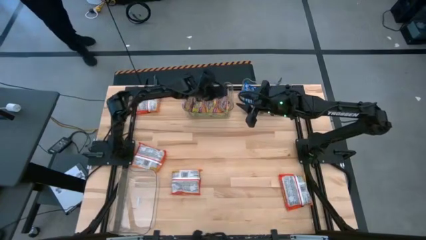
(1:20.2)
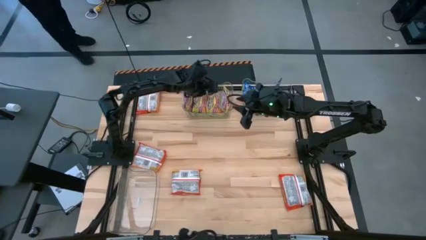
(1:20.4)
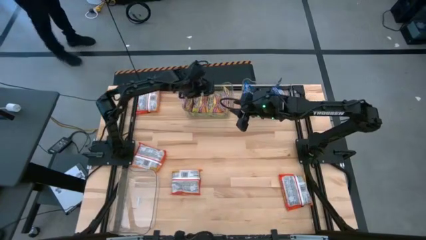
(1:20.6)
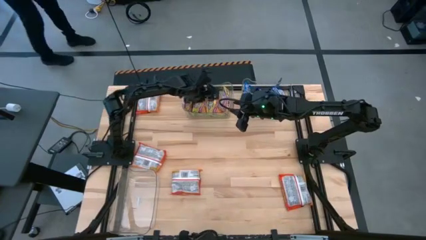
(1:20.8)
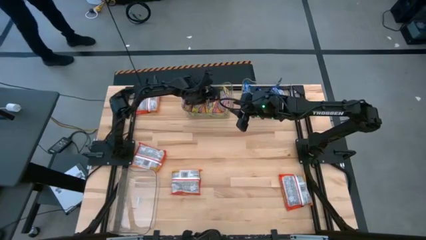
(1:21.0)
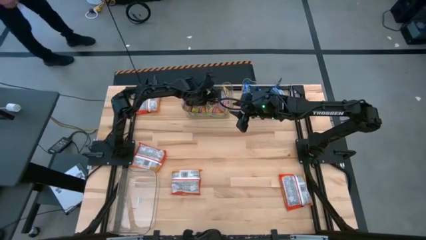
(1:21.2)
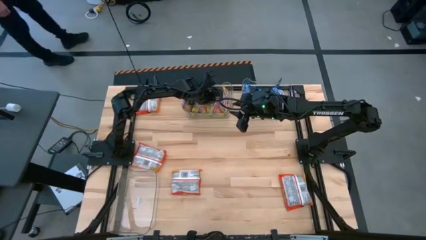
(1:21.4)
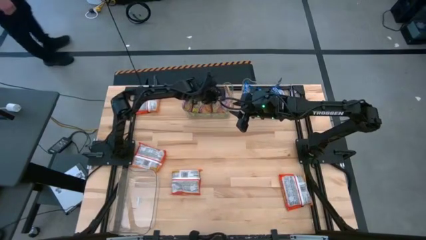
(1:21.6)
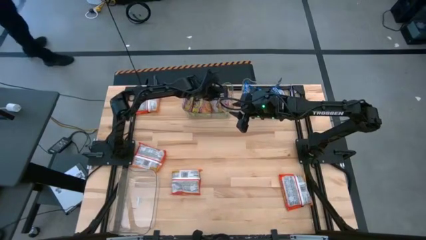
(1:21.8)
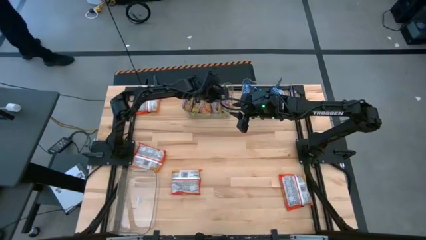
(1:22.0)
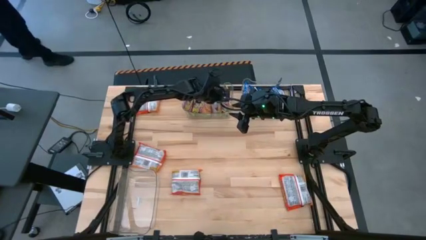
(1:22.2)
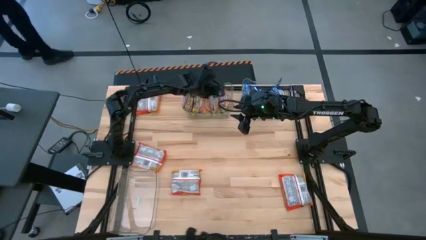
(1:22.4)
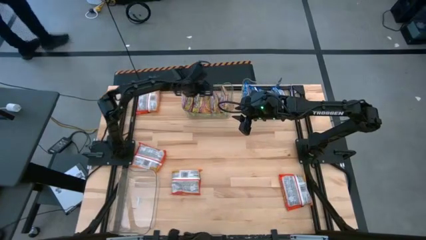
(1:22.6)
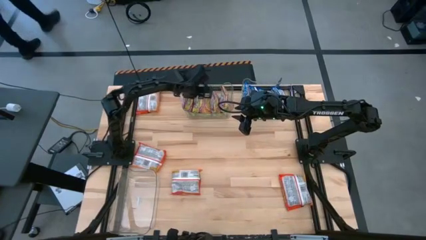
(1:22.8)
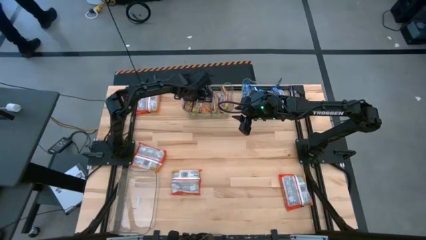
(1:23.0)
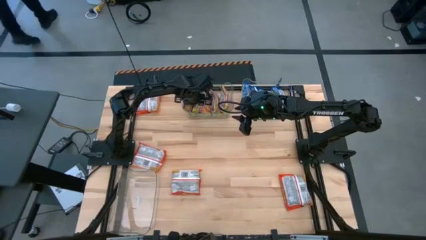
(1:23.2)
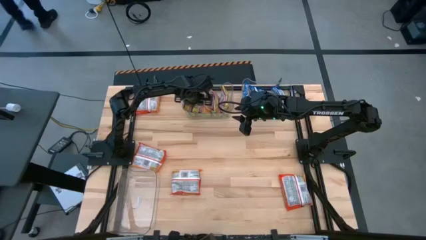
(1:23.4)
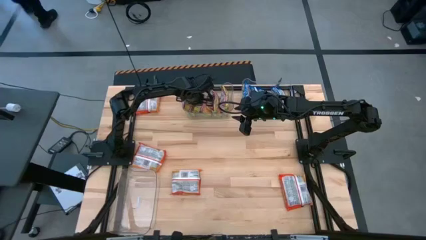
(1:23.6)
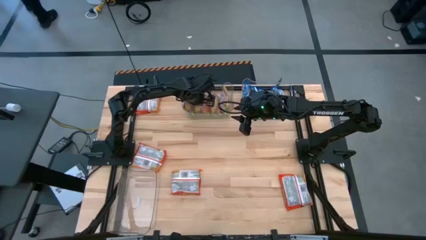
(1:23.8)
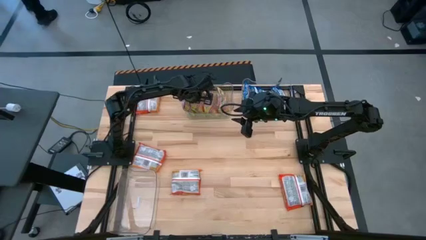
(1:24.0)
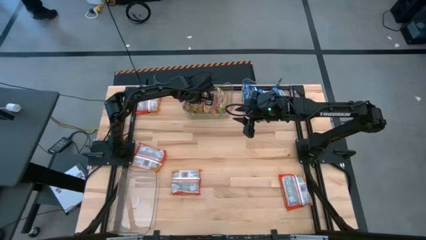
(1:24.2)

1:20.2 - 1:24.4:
Task: Sort Maruchan noodles
Adjust the green noodle packs in the top left transparent bin

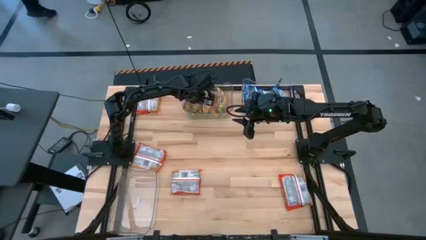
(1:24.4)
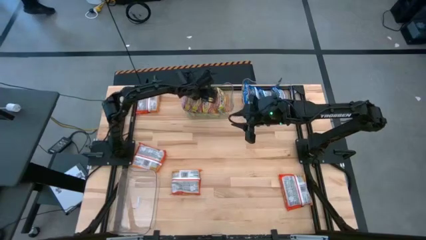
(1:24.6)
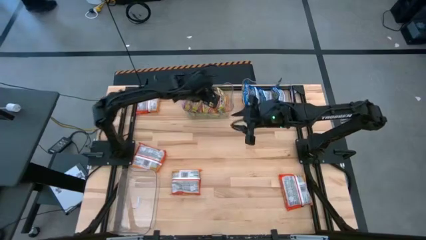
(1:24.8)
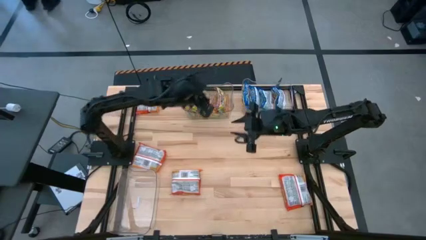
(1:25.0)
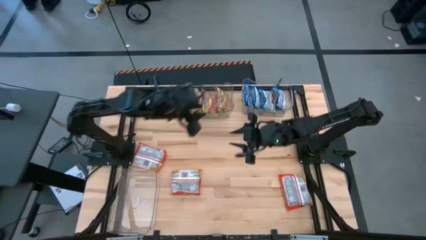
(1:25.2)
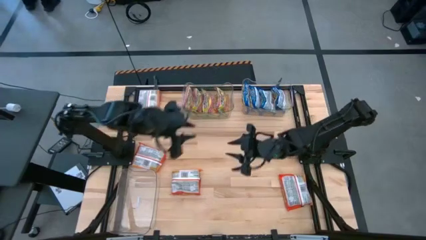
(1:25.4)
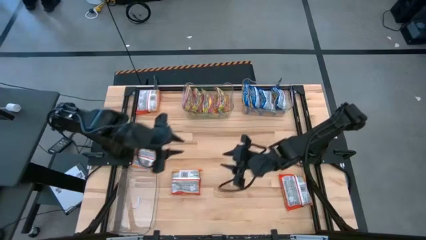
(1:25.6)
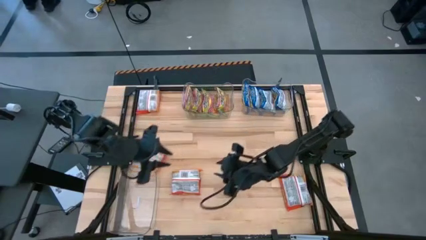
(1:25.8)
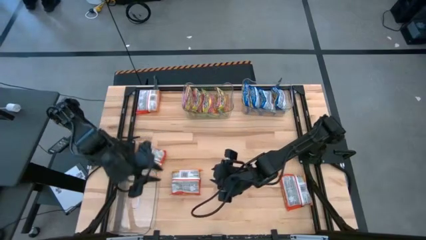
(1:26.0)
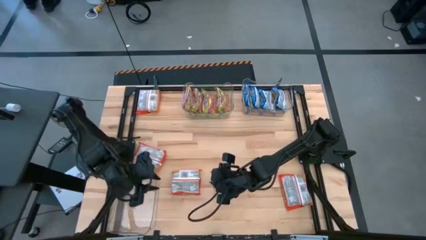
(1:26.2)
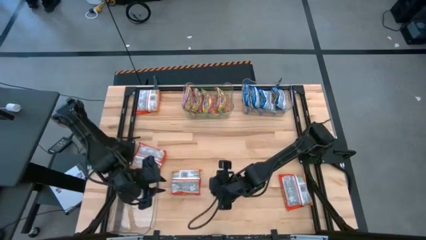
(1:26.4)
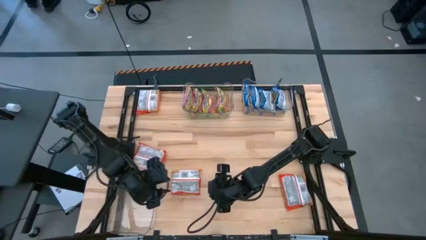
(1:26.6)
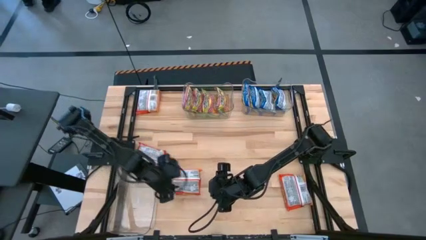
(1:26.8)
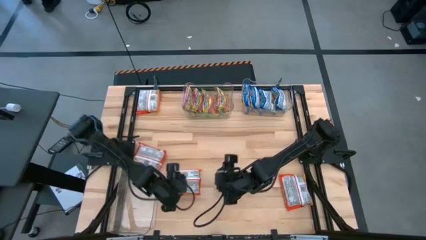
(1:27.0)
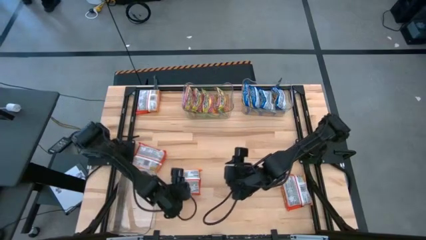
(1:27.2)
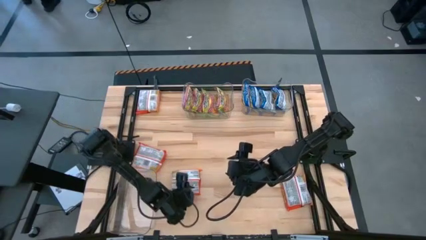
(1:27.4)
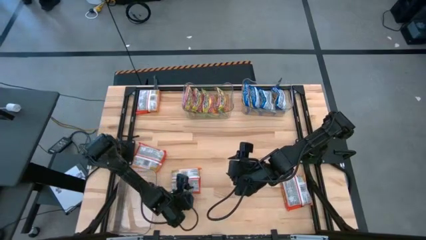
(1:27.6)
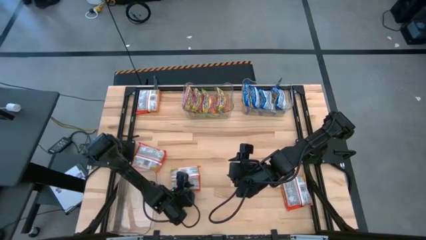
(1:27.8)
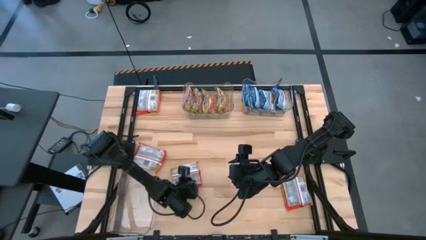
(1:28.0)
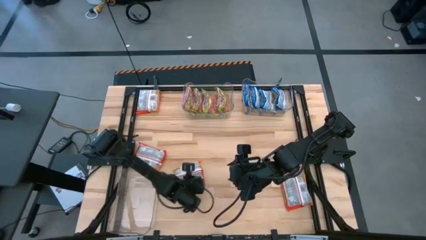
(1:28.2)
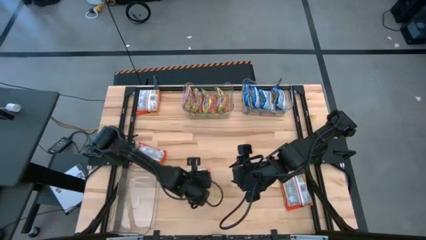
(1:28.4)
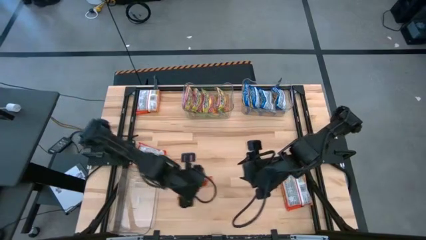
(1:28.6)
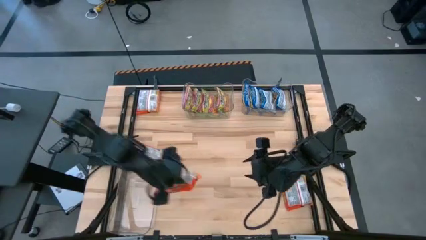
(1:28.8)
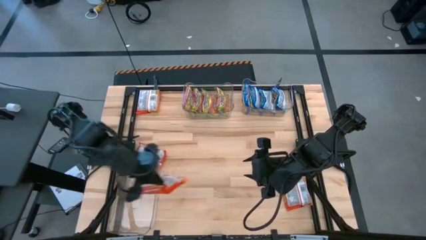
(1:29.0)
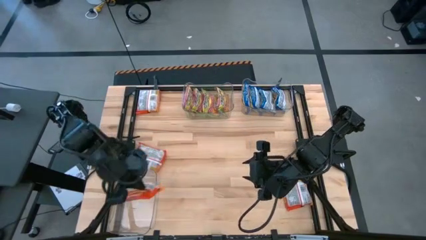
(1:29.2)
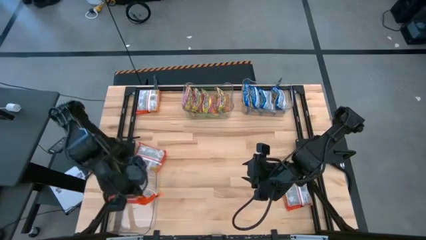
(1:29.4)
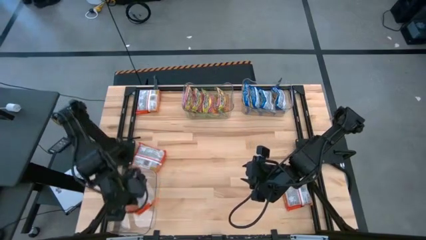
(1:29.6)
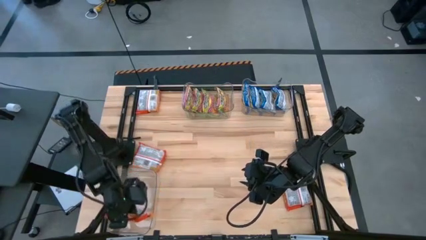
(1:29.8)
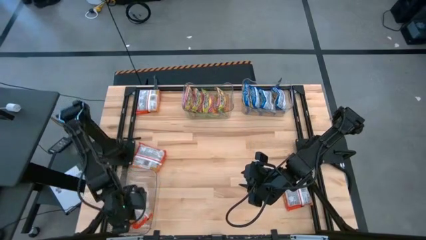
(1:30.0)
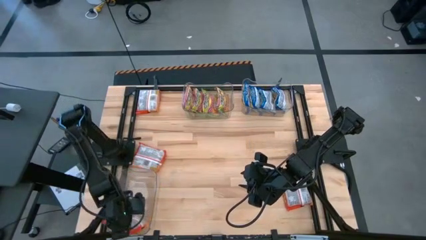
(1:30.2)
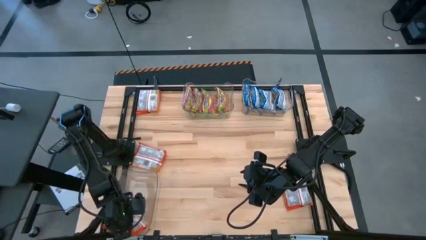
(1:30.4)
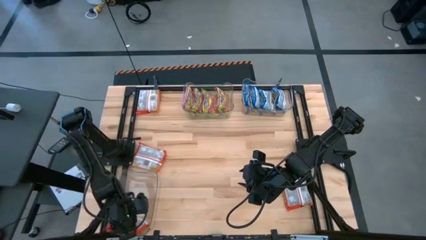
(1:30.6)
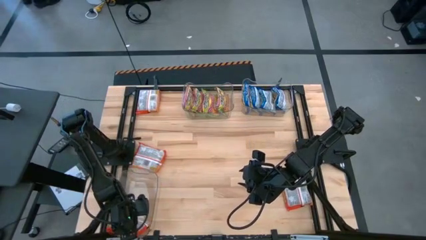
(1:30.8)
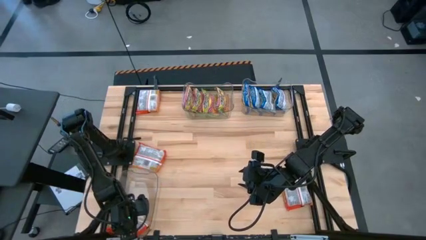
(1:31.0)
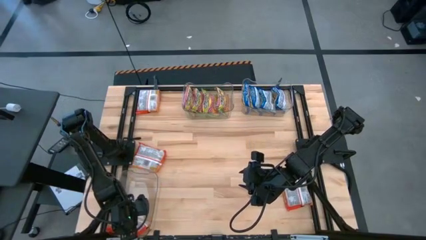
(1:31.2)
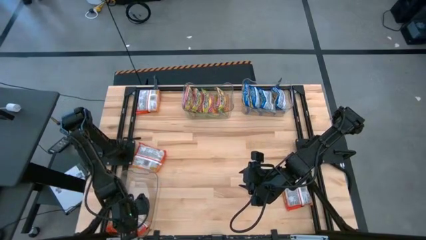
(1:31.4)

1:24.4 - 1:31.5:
Put the orange noodle pack into the bottom transparent bin

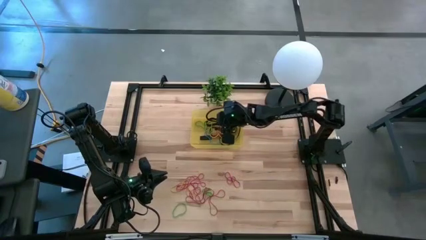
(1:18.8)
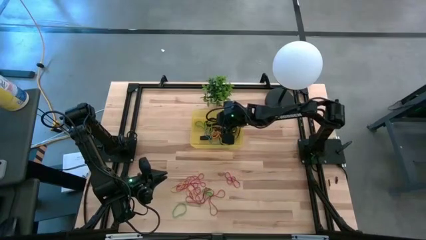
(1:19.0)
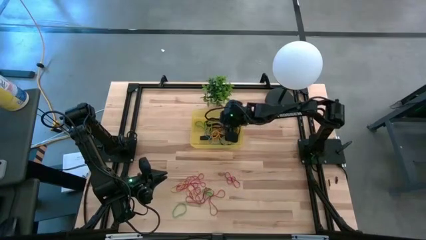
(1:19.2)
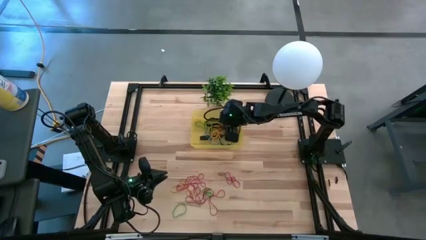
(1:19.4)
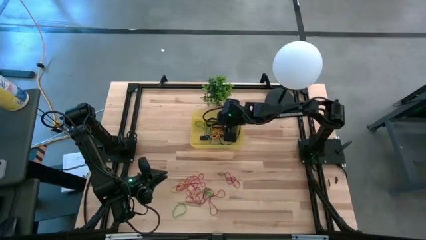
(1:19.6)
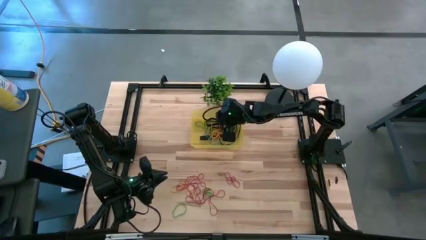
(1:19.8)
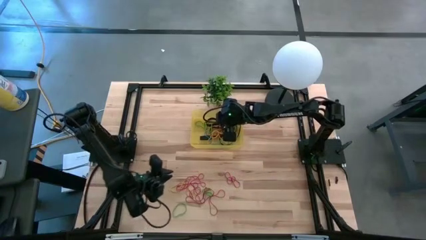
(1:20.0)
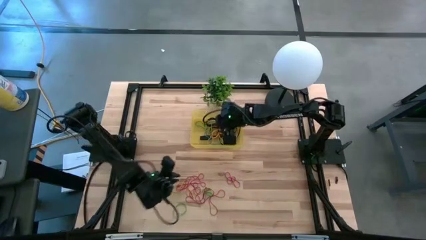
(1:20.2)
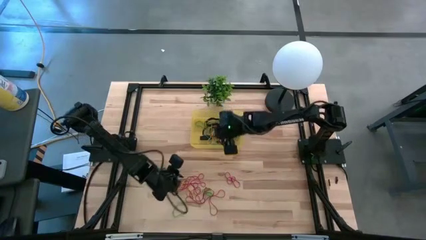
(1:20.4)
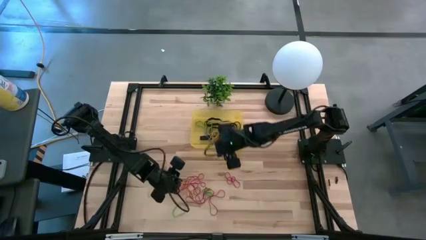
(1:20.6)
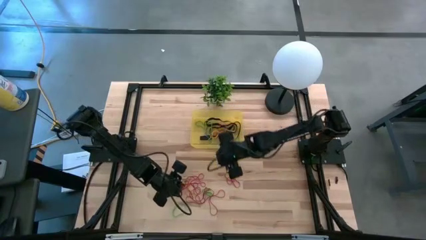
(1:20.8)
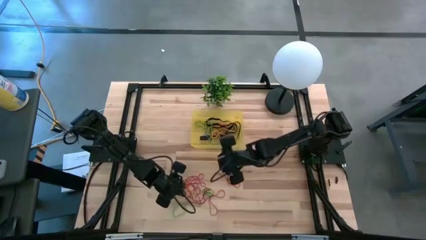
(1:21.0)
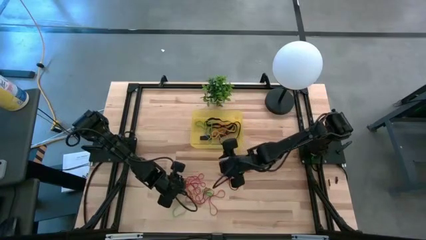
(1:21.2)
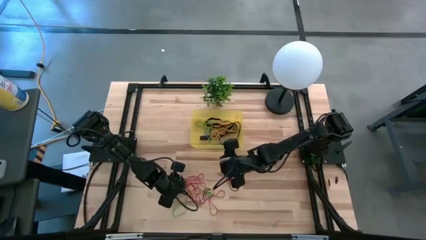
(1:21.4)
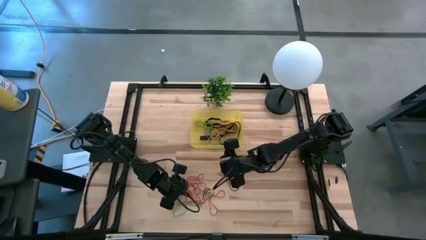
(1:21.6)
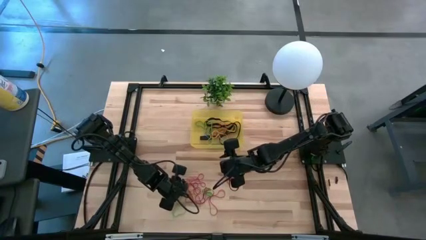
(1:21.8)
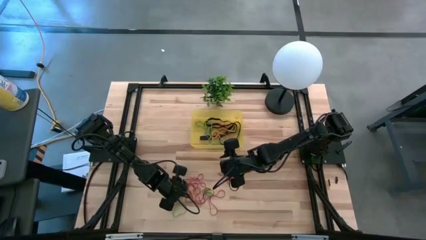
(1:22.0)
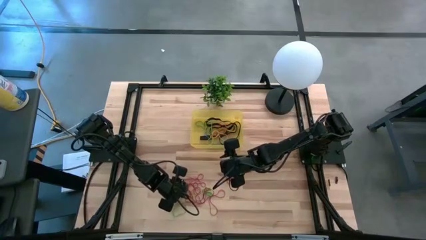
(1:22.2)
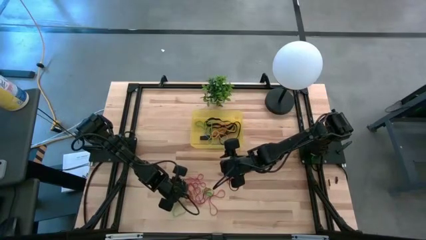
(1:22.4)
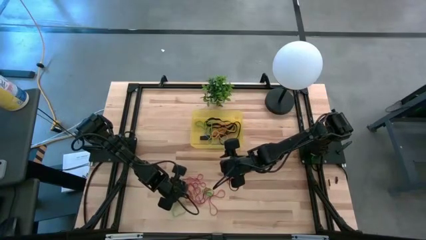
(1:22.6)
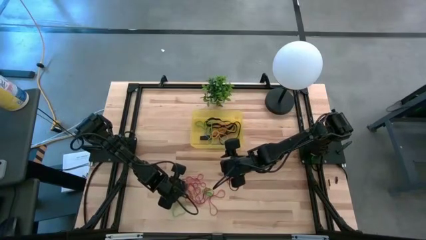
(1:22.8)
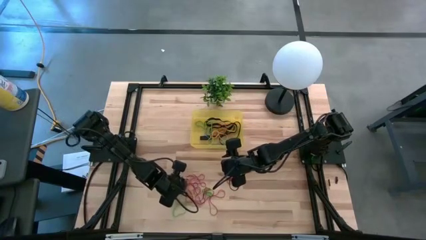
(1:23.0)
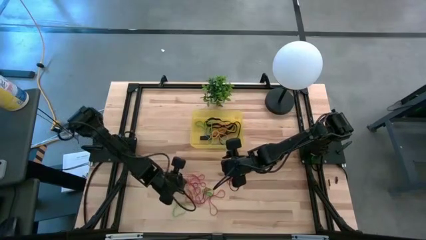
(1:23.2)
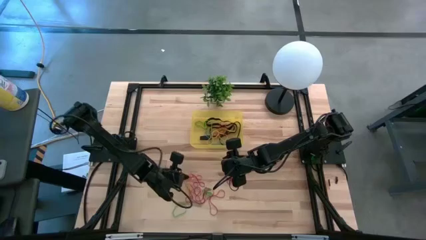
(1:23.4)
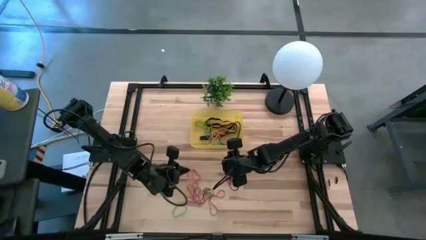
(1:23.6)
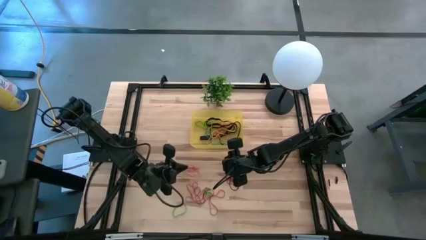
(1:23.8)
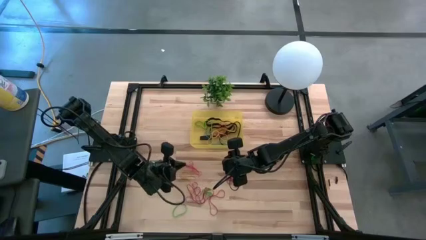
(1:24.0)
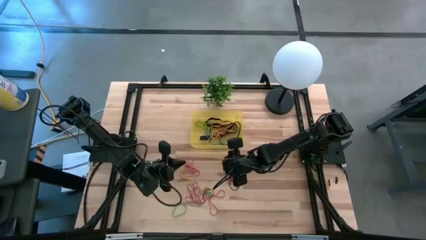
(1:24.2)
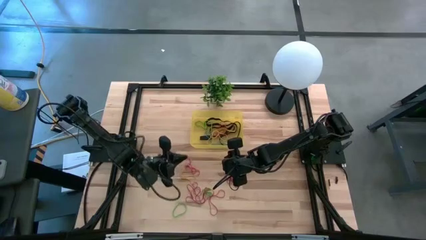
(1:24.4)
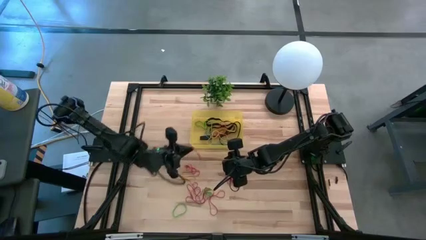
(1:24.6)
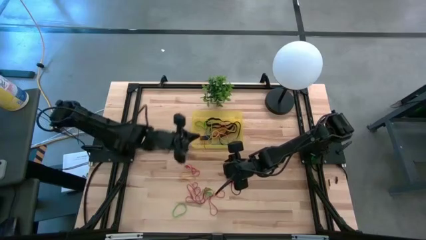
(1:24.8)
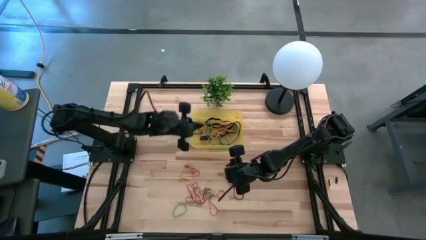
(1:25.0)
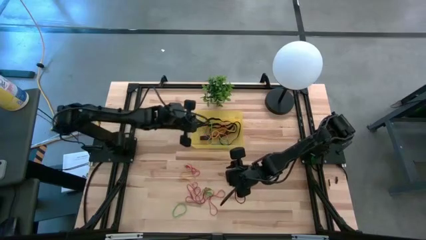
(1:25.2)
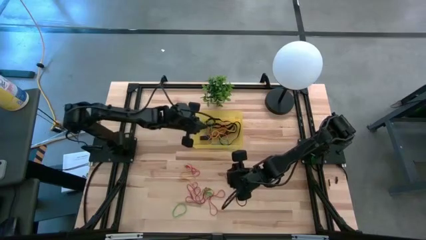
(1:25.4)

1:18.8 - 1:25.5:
Task: Pick and place rubber bands into bin
Put the red rubber band into the yellow bin
